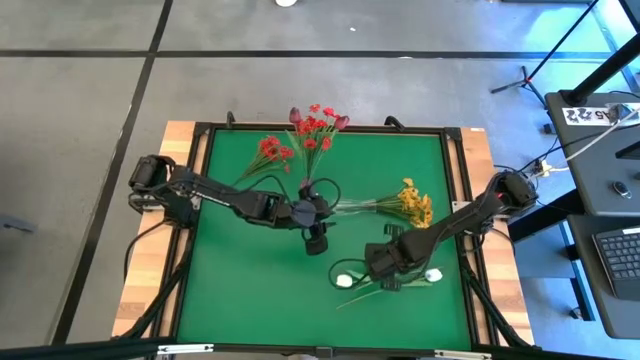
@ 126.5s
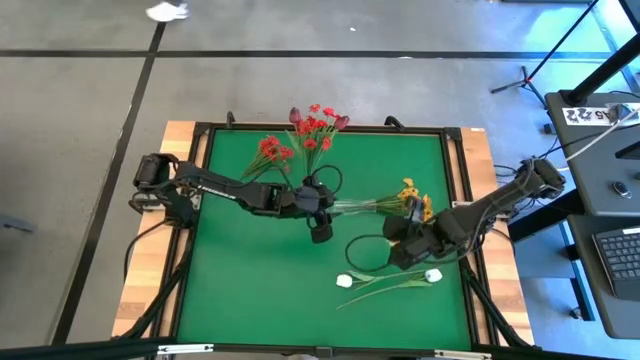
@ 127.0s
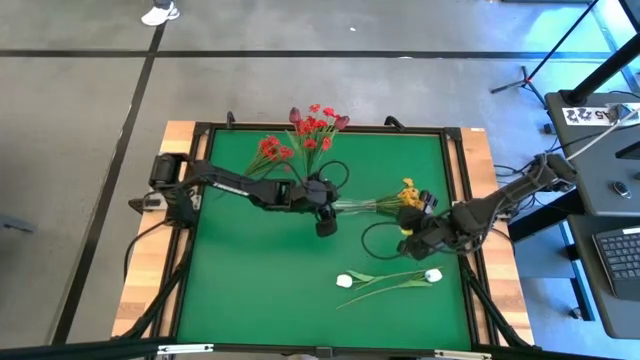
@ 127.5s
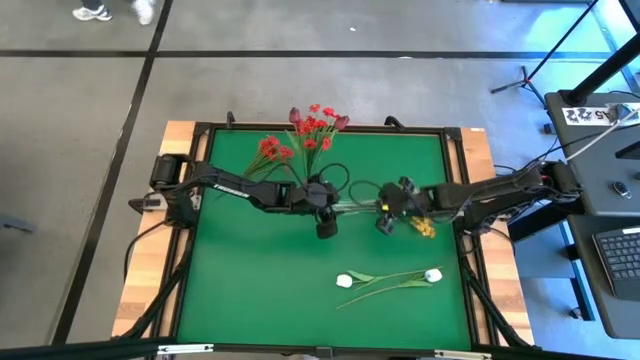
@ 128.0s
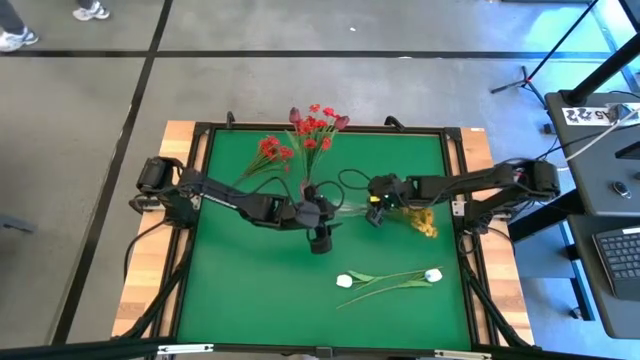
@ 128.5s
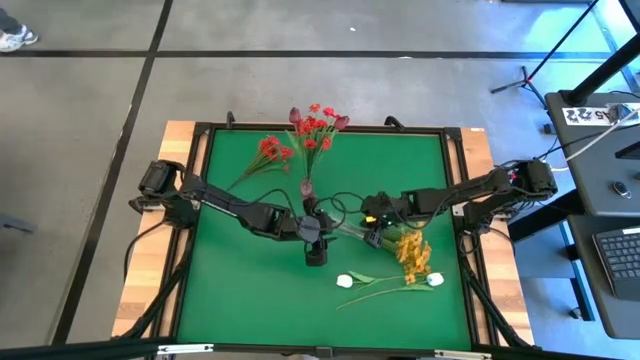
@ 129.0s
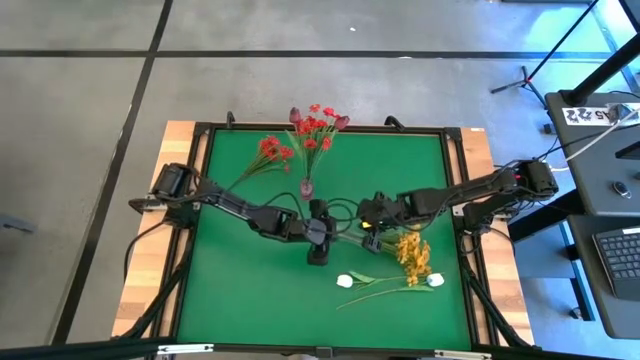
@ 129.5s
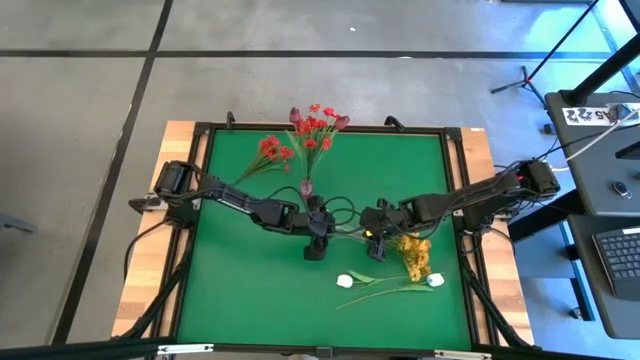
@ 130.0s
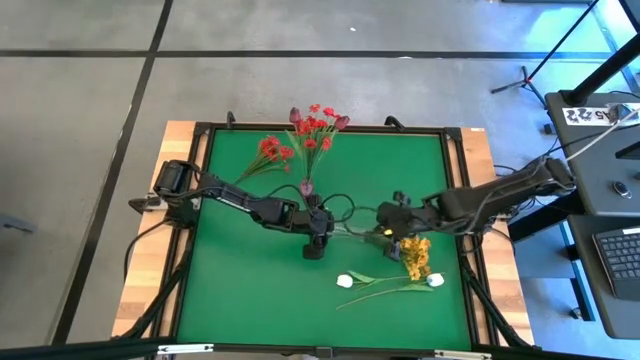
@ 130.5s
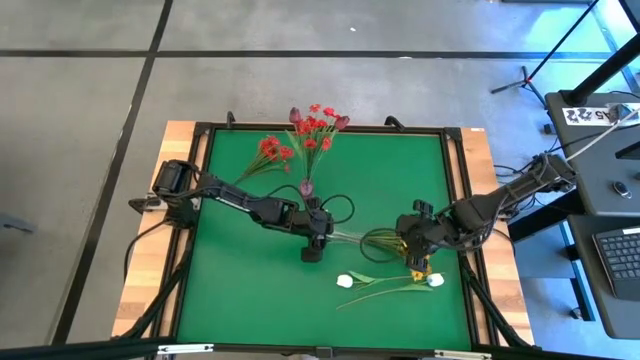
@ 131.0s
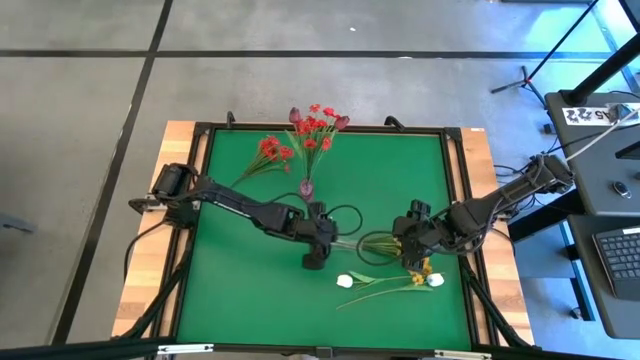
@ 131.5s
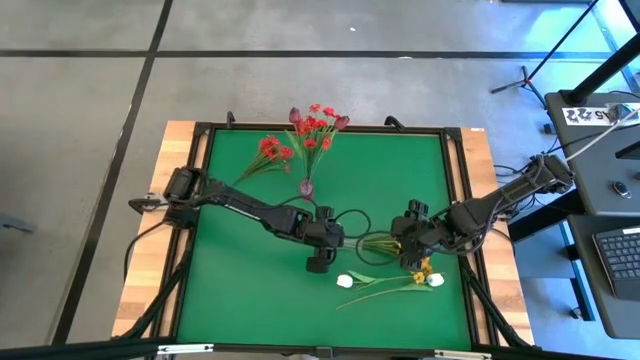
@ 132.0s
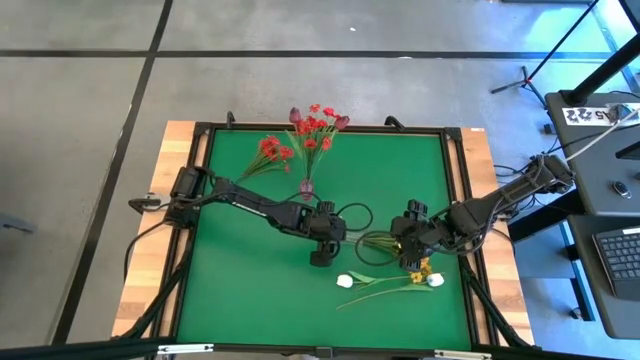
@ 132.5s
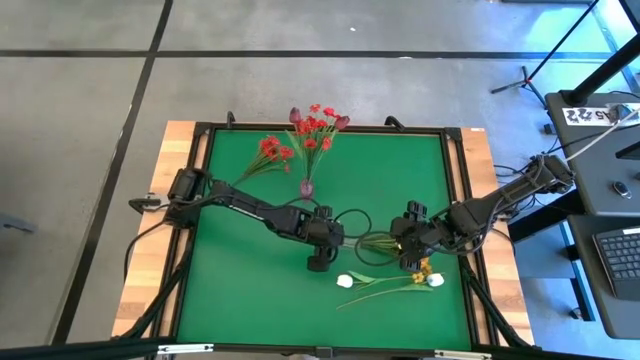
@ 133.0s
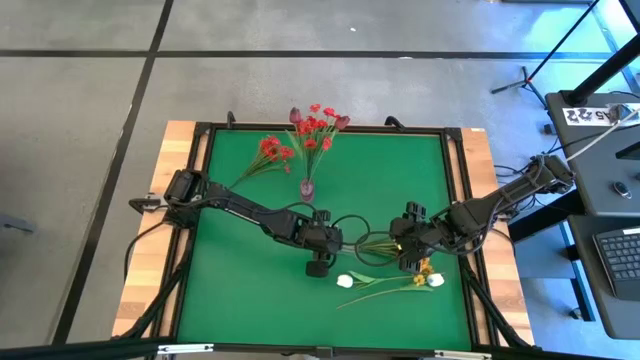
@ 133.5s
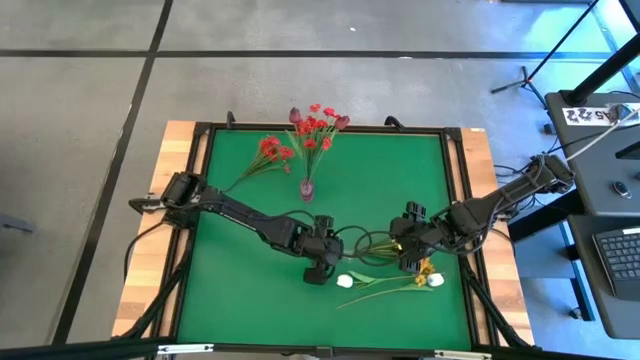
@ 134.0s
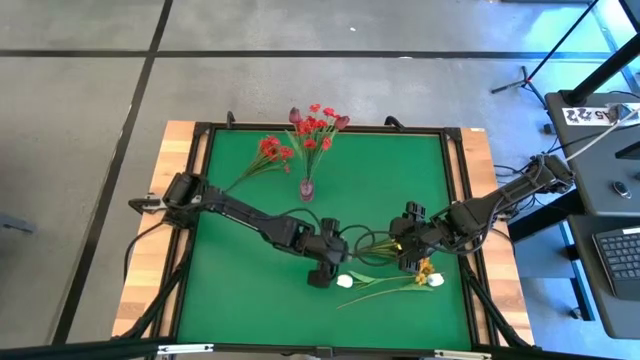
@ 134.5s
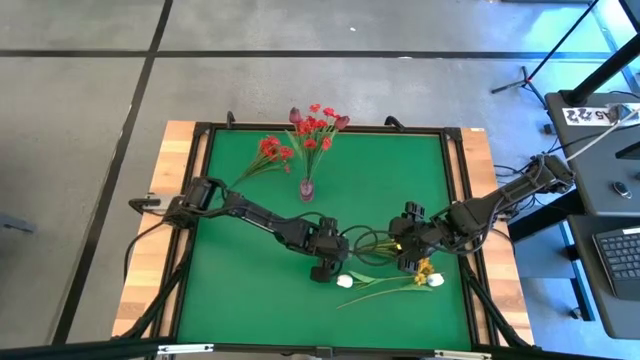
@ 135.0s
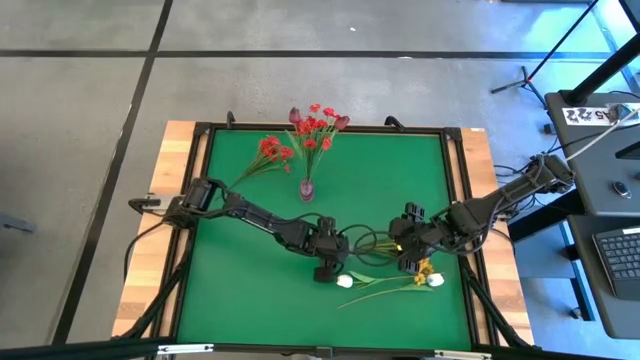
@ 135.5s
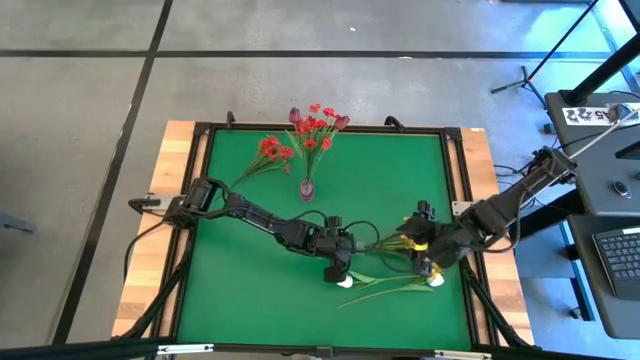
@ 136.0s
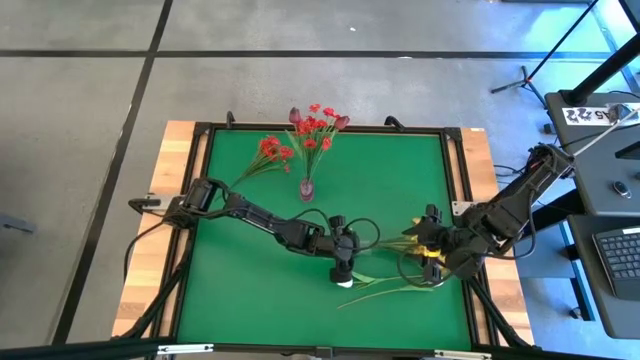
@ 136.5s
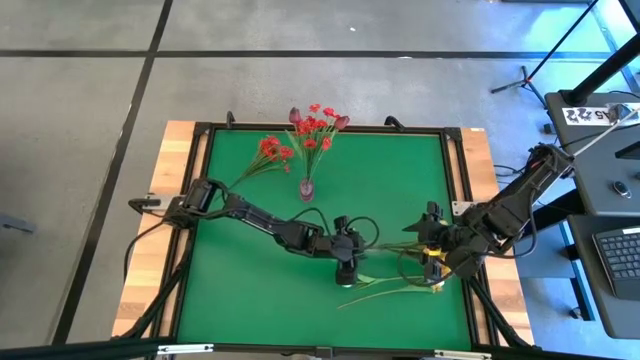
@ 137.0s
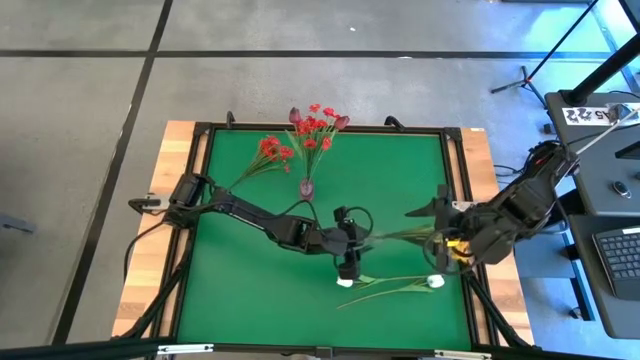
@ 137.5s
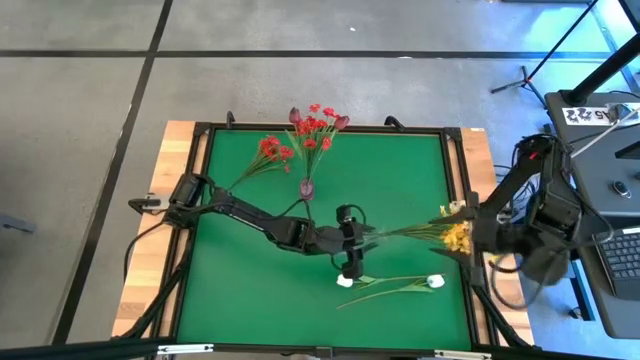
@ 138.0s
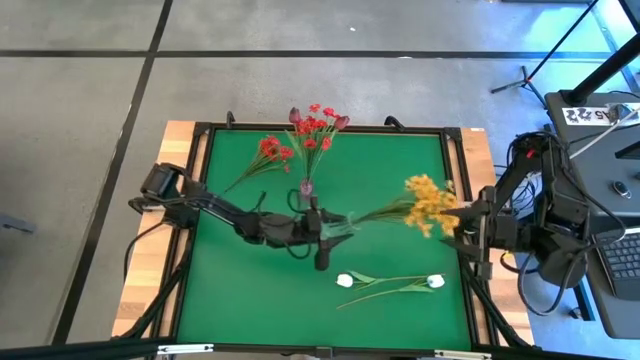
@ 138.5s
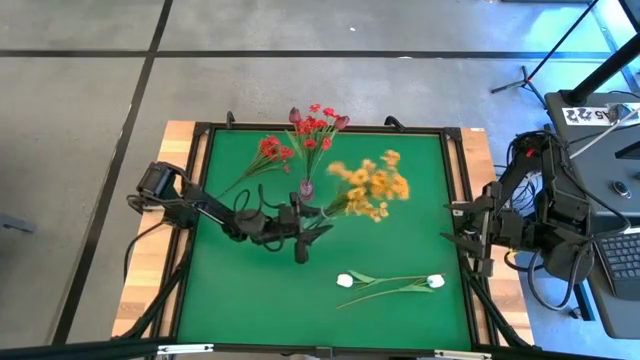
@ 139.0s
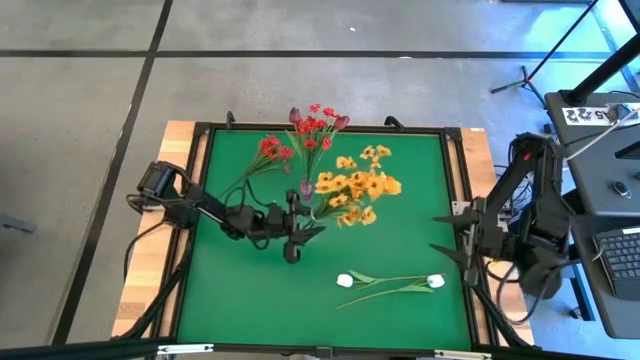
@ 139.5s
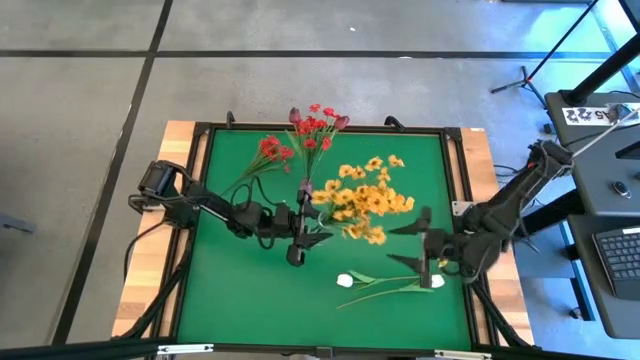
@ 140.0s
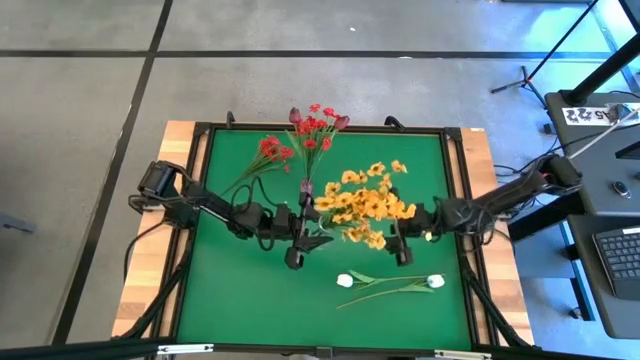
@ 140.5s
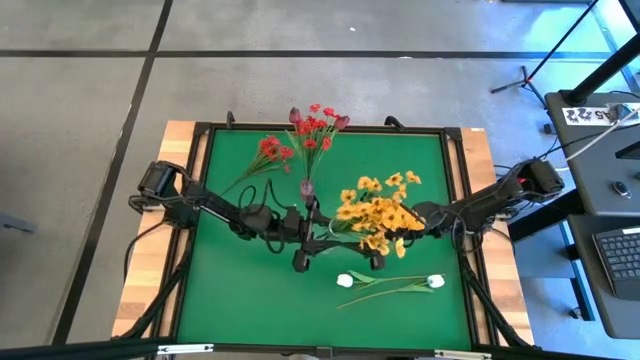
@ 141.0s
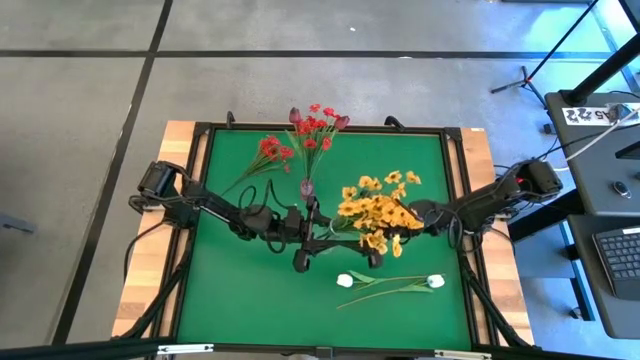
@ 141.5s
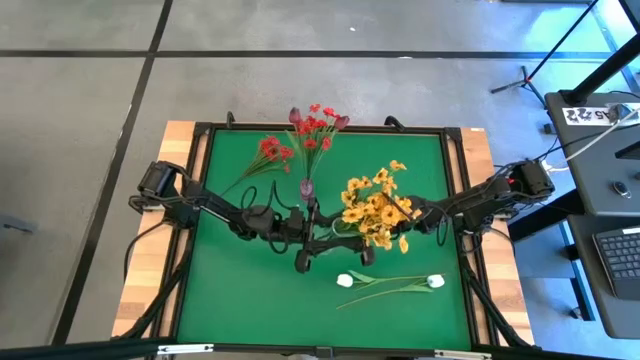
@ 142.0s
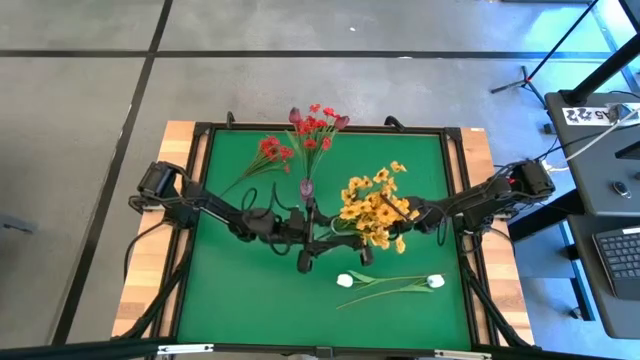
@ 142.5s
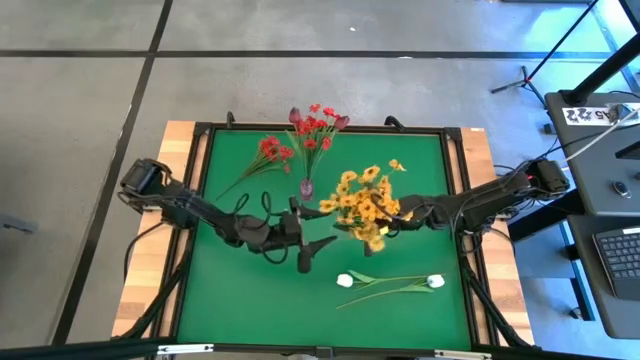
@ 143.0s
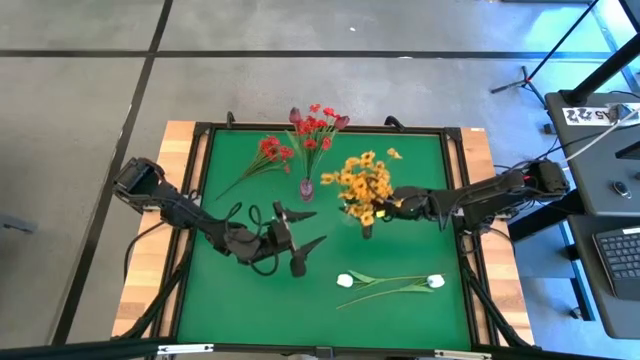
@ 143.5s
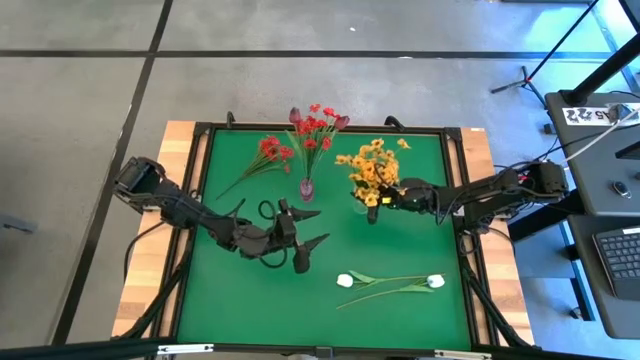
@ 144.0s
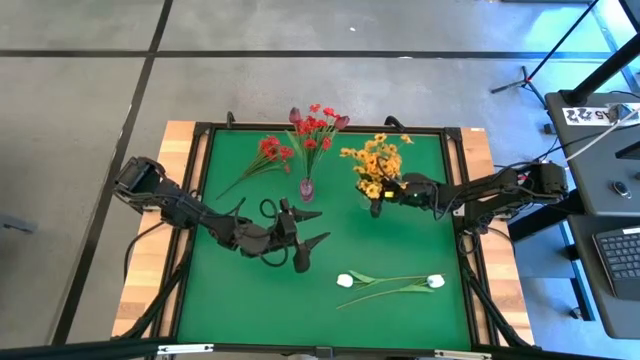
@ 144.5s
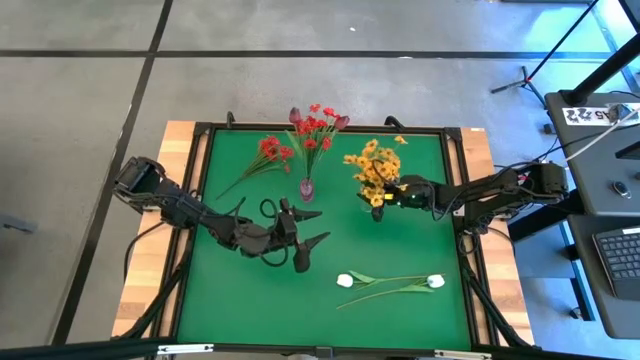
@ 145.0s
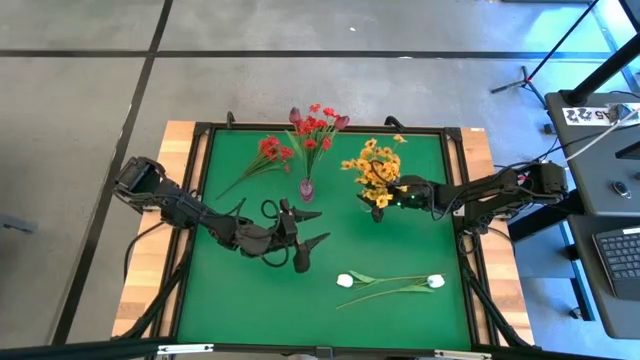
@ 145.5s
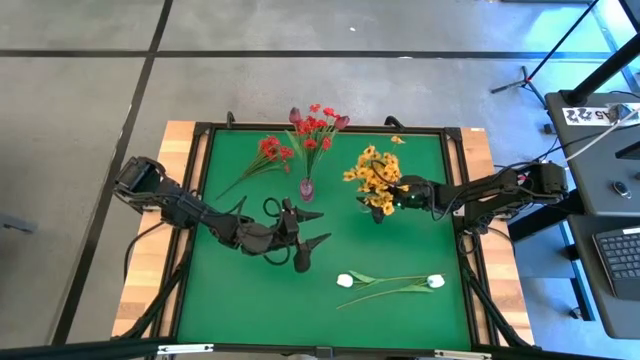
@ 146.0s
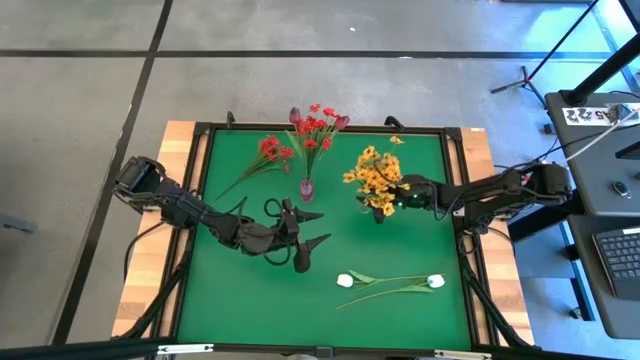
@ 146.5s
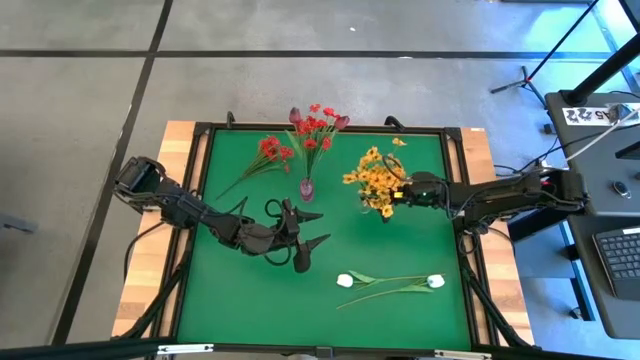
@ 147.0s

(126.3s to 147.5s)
Task: Sort flowers into vase by color
Adjust the transparent vase
